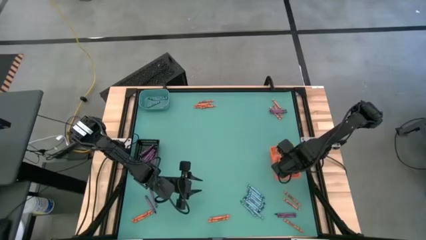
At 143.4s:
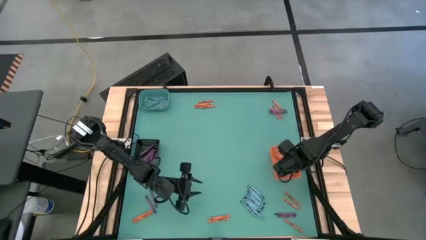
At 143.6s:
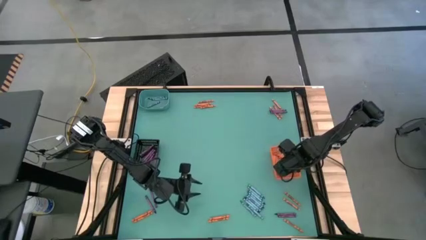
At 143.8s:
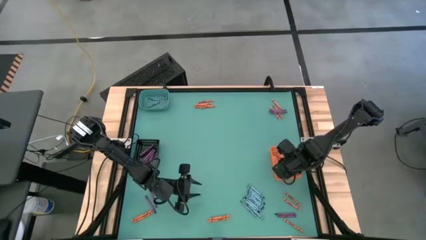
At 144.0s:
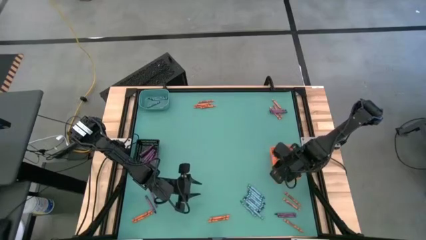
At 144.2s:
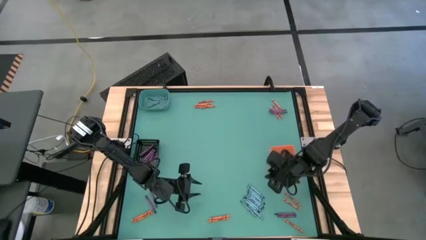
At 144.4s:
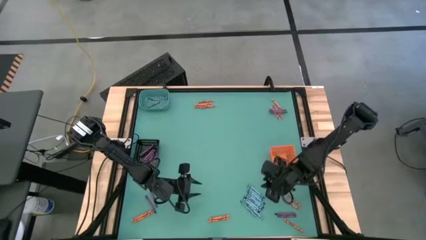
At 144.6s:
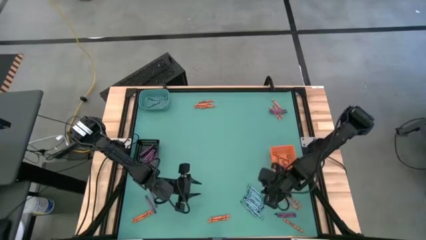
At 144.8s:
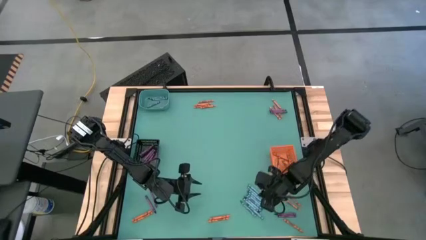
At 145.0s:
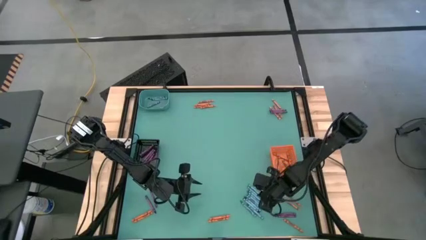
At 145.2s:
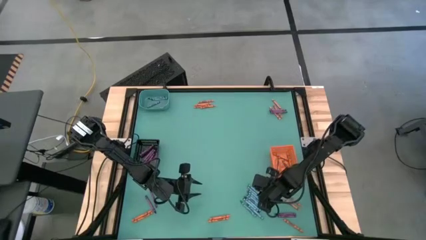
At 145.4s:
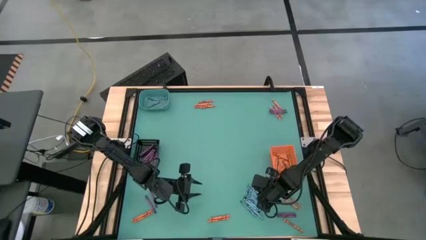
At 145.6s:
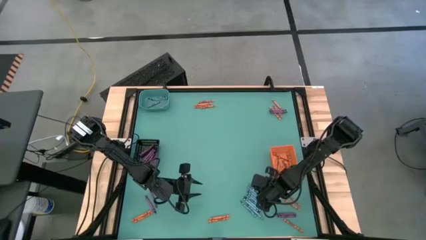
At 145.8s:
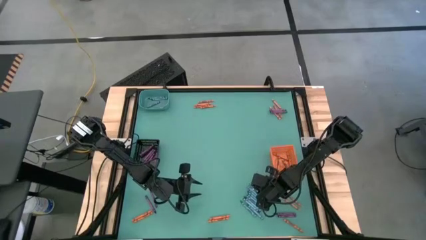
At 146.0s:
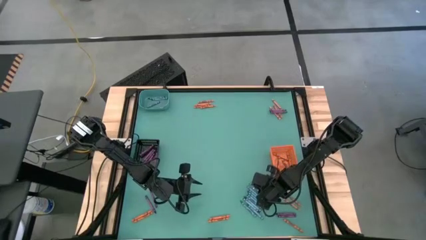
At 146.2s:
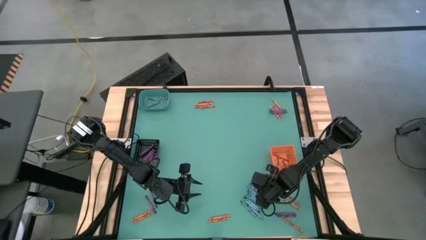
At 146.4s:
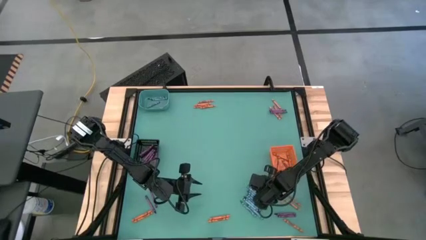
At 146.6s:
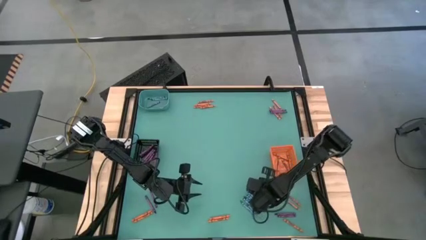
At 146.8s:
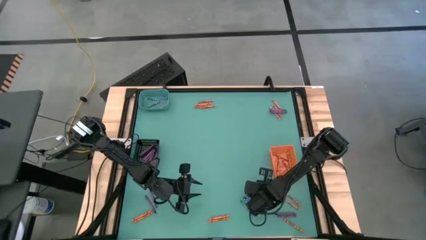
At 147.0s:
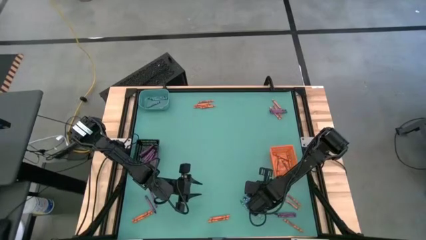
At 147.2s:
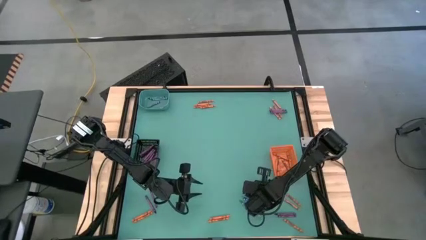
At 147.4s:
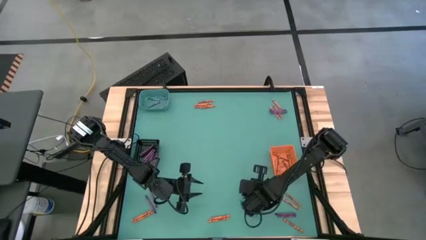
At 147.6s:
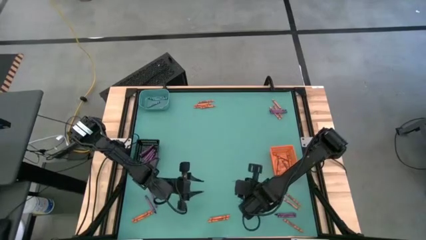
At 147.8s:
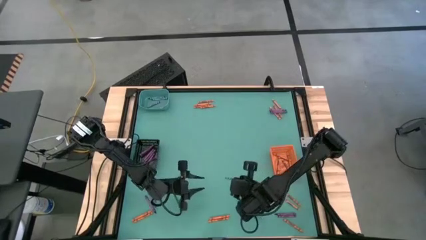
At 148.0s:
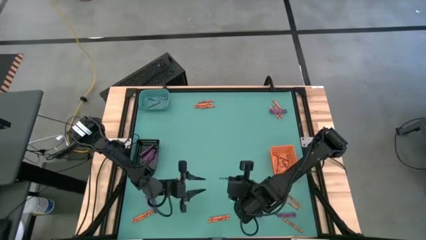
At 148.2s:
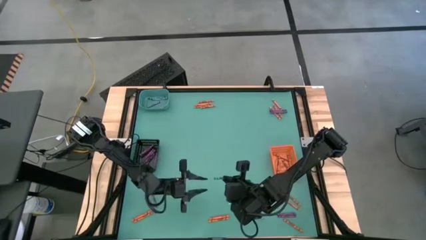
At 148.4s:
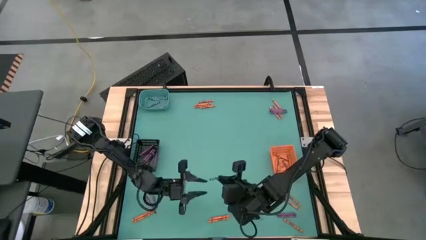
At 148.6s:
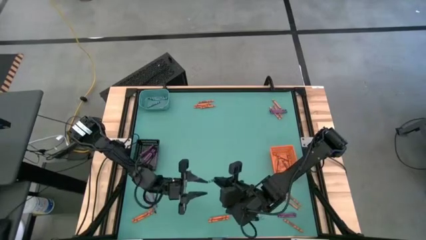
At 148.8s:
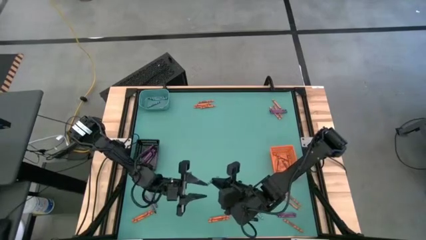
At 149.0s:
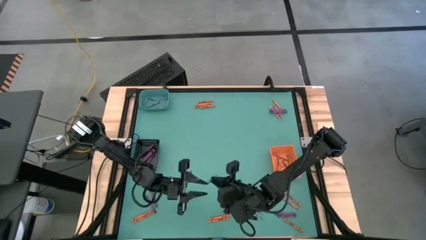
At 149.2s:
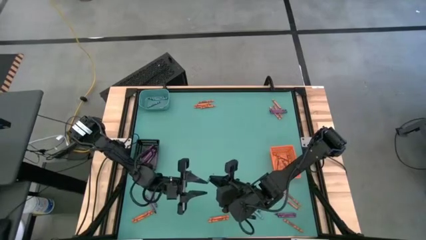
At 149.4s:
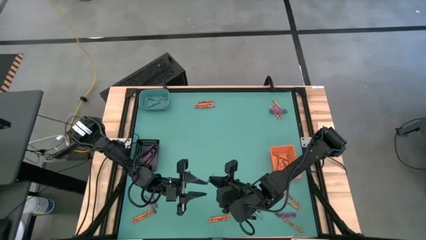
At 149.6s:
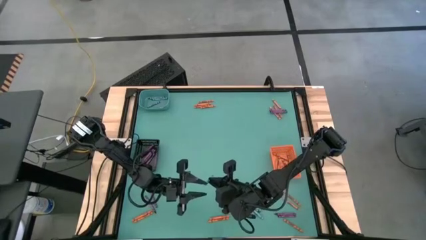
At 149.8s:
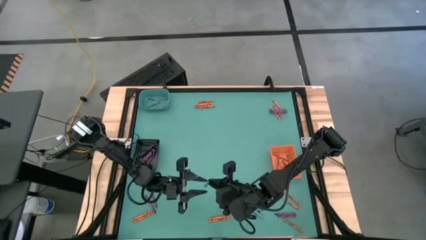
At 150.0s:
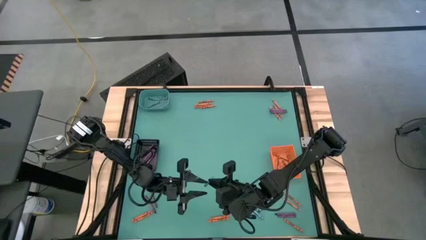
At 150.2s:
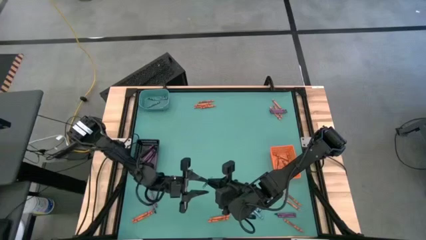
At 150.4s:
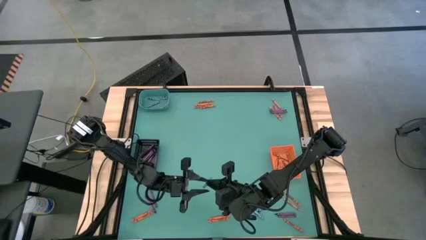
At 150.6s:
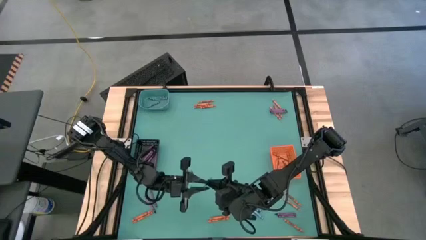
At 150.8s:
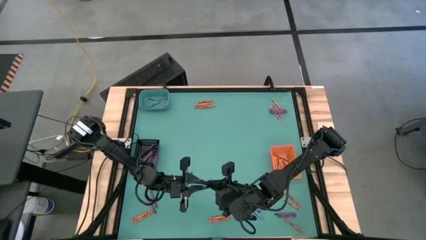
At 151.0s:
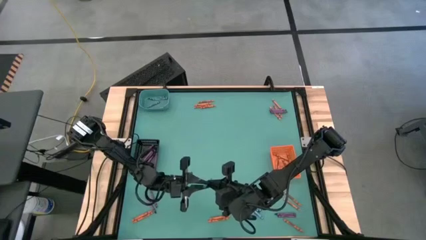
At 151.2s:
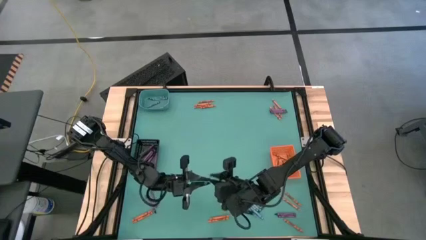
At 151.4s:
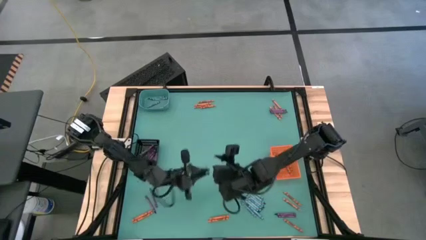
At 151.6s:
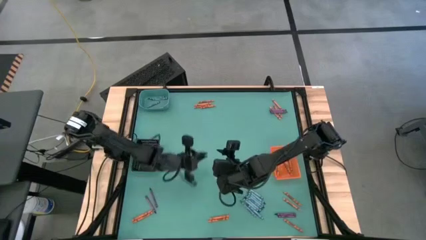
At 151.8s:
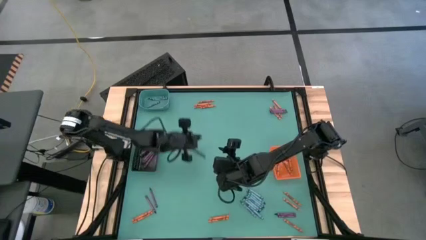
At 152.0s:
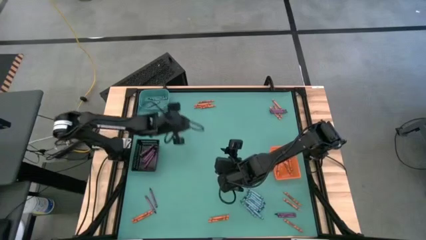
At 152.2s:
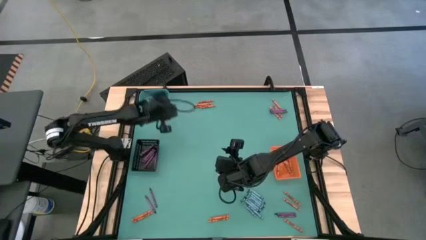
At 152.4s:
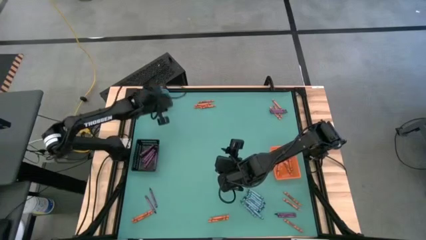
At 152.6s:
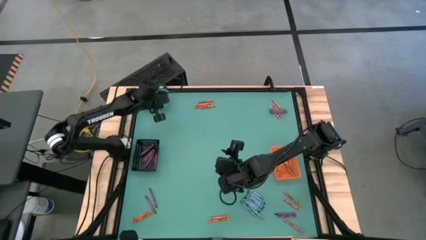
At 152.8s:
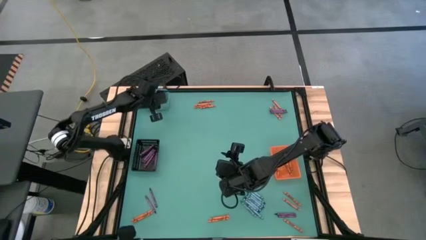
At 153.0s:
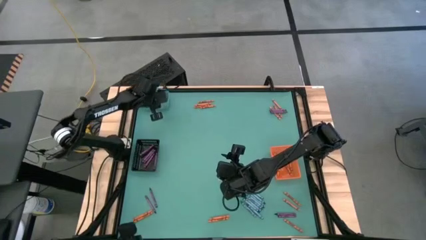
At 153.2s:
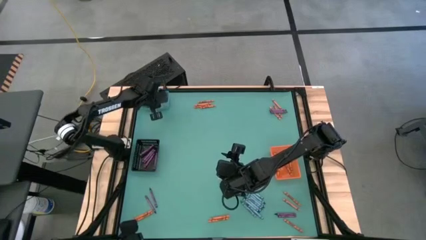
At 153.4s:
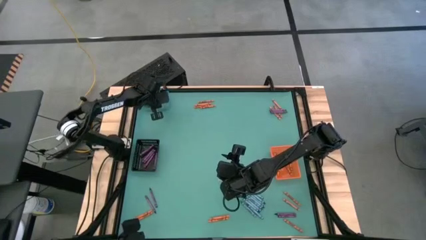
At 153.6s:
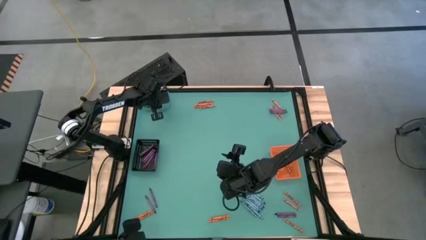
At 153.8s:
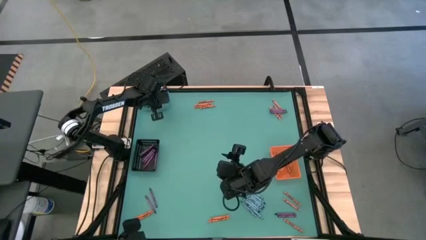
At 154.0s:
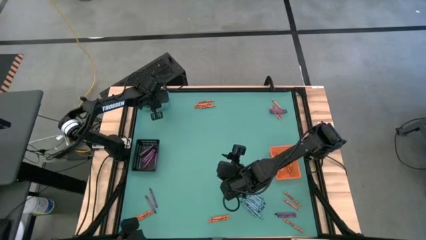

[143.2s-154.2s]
Task: Sort crayons
Put the green crayon into the green bin

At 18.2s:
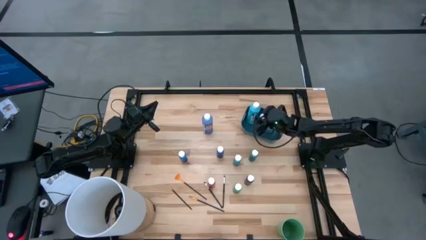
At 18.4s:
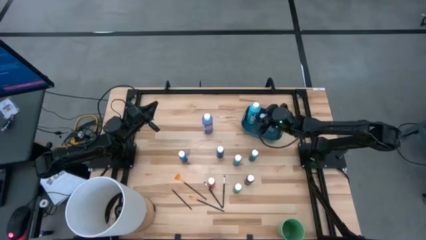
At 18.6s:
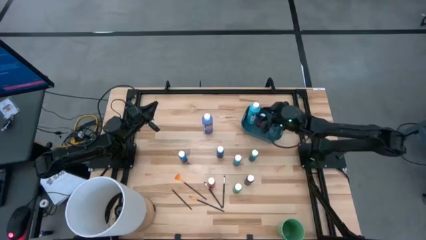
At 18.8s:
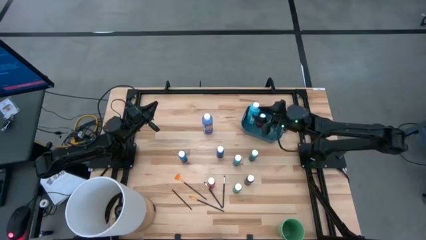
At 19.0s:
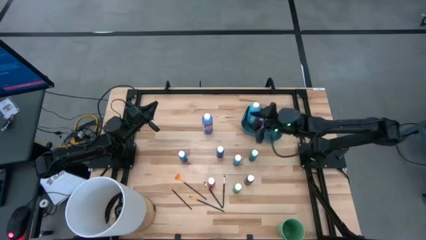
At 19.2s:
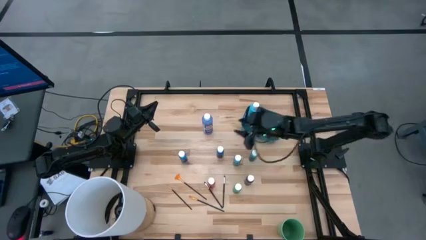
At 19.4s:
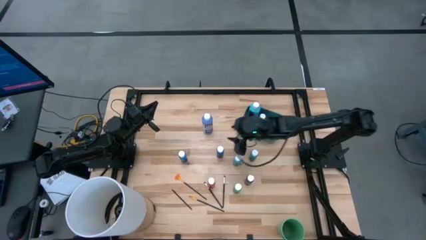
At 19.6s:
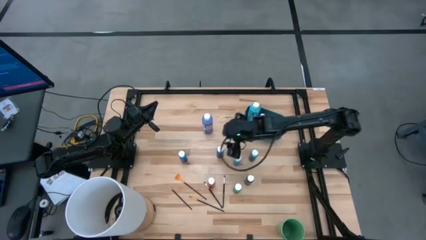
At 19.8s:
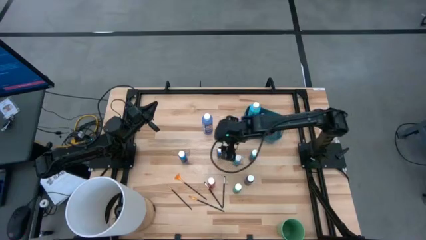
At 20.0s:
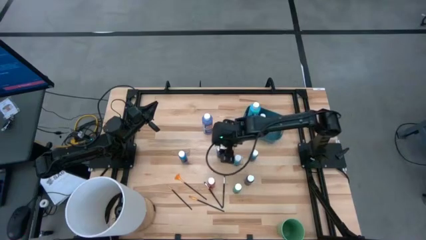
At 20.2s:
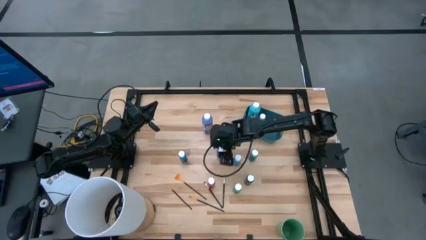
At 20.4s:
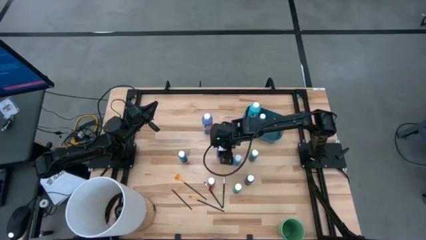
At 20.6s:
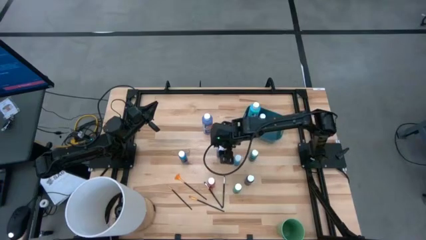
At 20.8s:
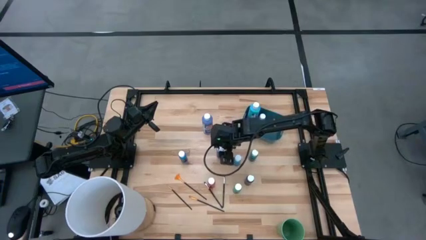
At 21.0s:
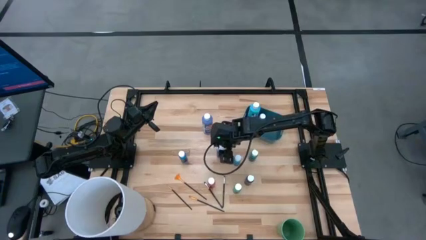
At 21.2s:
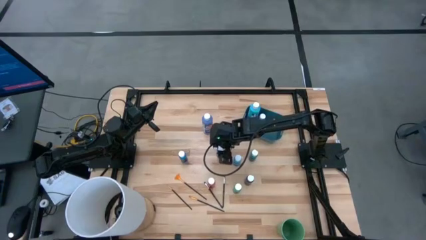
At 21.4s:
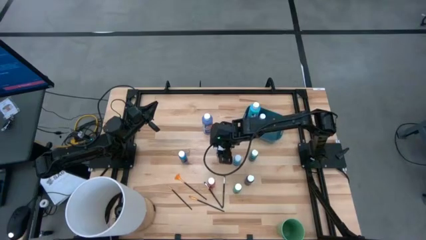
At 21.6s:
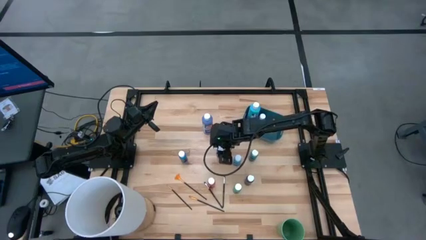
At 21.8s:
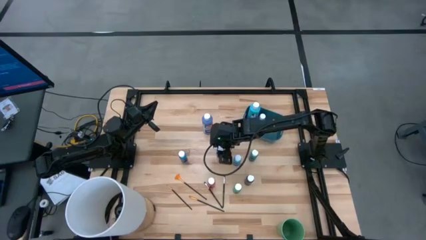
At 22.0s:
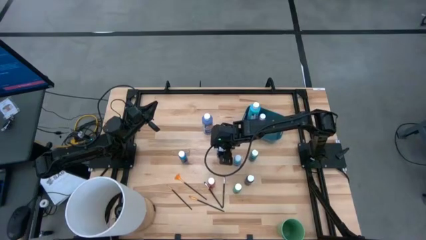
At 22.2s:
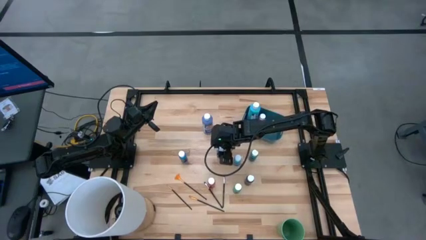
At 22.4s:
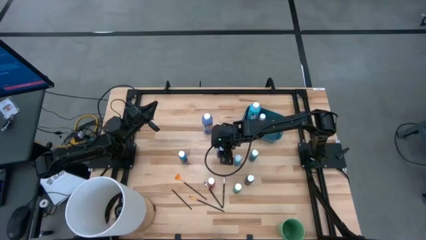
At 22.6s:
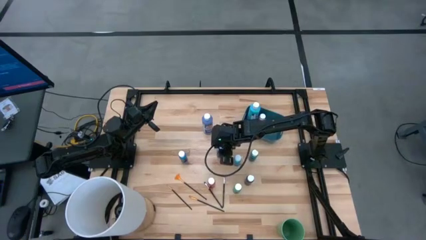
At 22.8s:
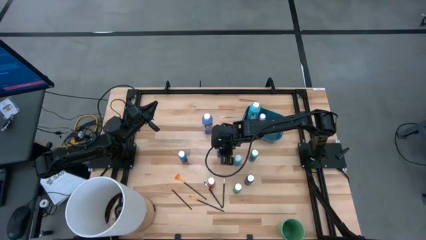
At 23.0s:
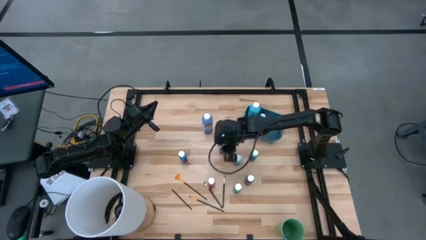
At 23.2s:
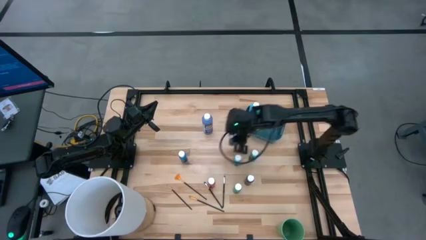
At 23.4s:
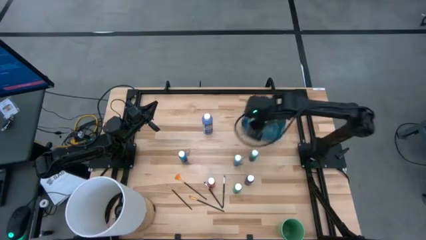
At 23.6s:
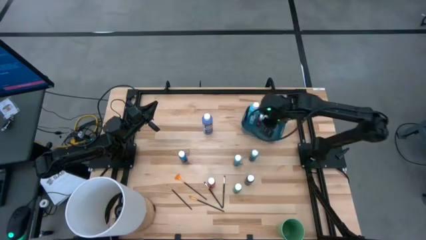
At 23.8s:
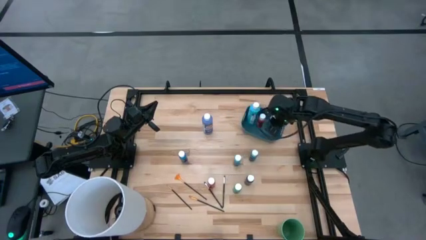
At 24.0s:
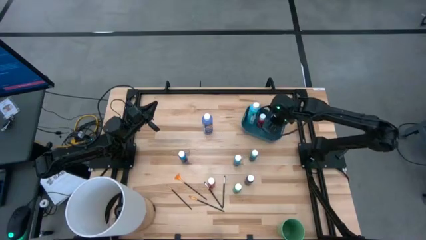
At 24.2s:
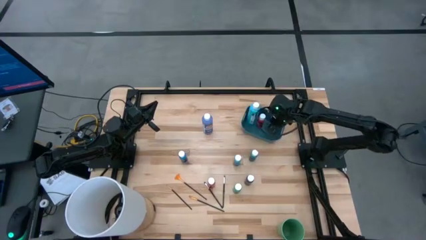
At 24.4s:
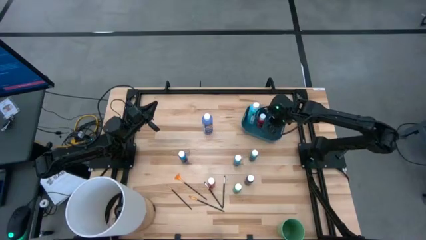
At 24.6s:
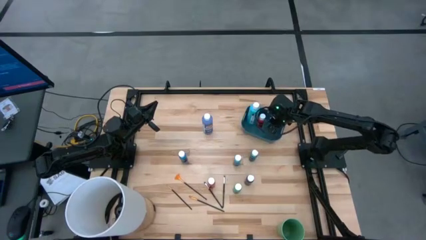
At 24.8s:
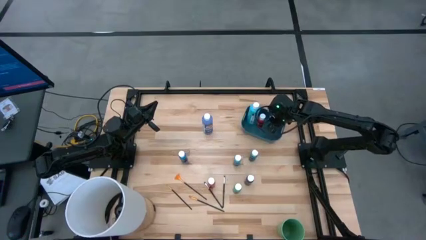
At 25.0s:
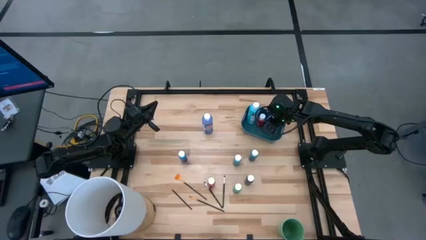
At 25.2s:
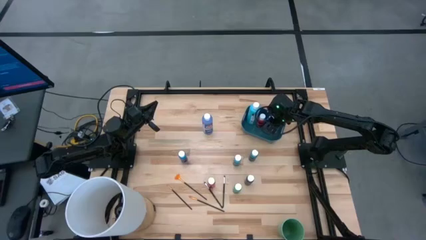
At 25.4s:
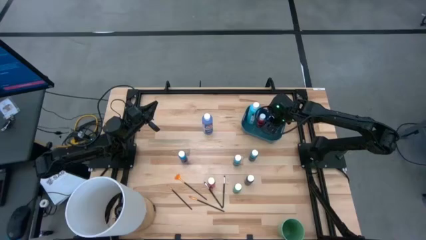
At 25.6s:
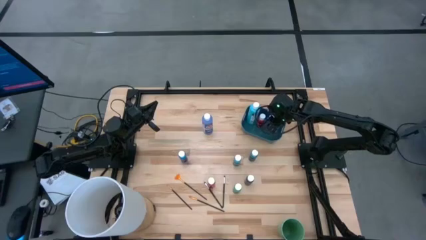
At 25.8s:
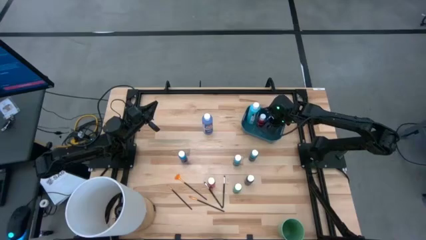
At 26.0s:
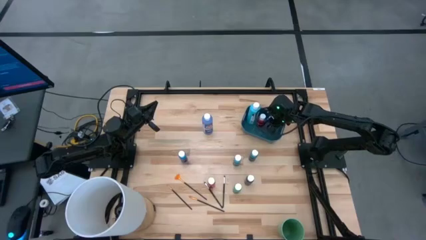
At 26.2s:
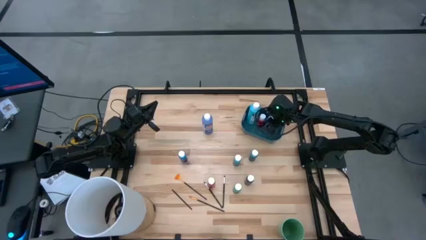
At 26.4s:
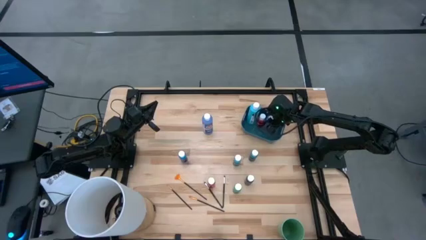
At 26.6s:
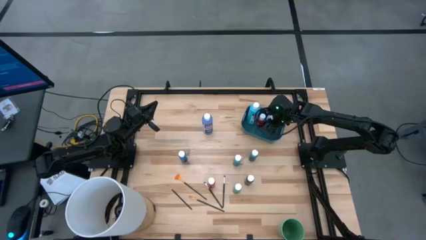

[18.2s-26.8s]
Task: Pick & Place Paint Supplies
Put the small purple paint bottle into the blue bin
